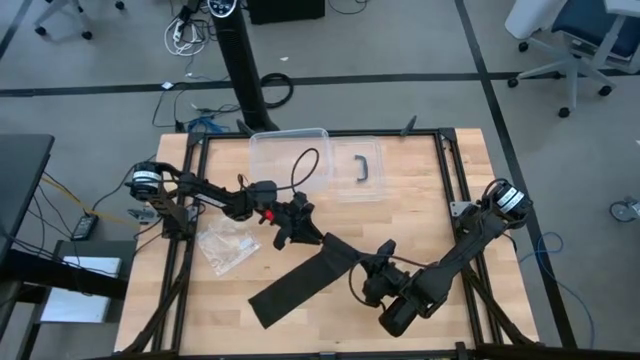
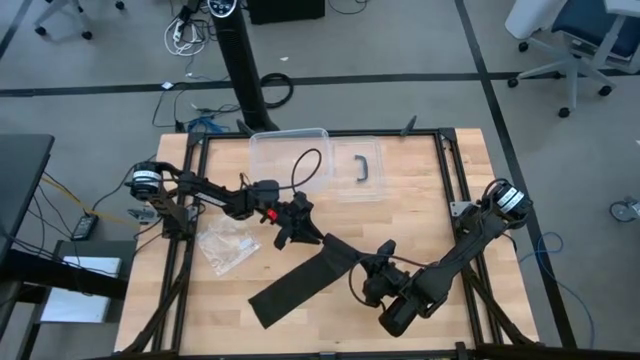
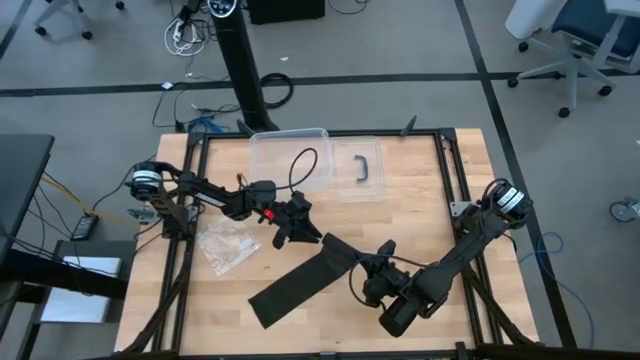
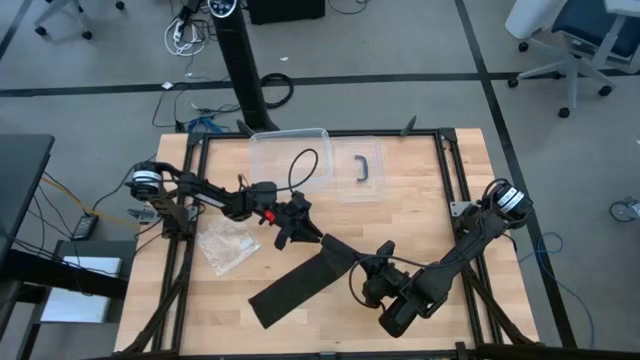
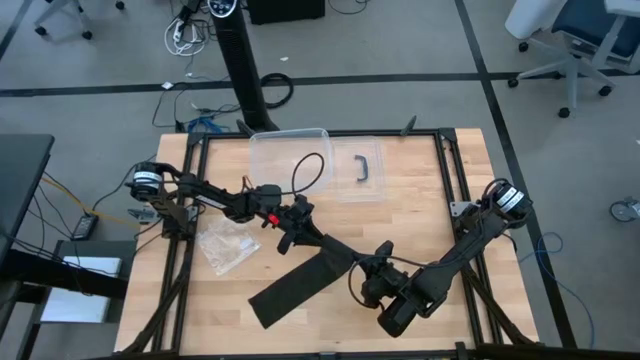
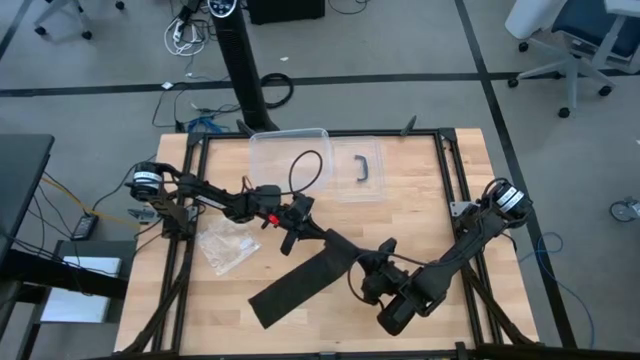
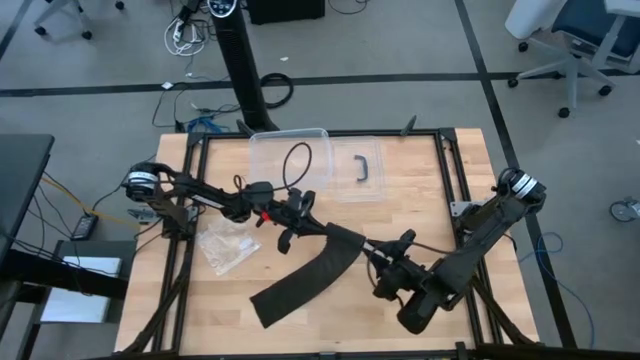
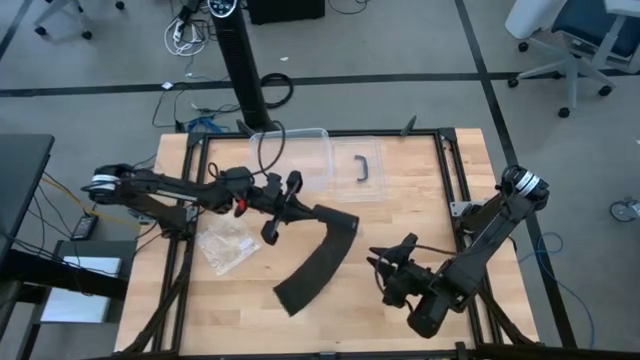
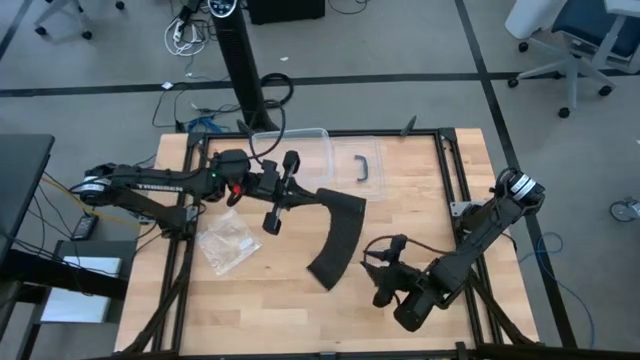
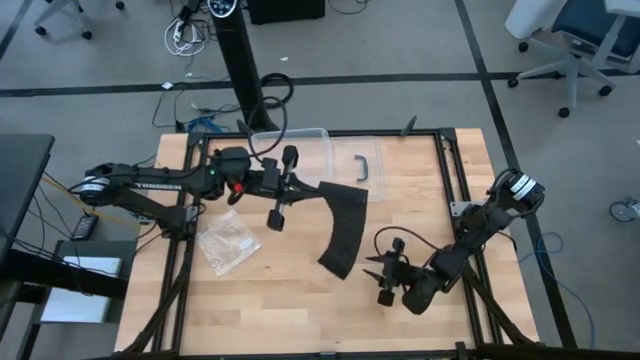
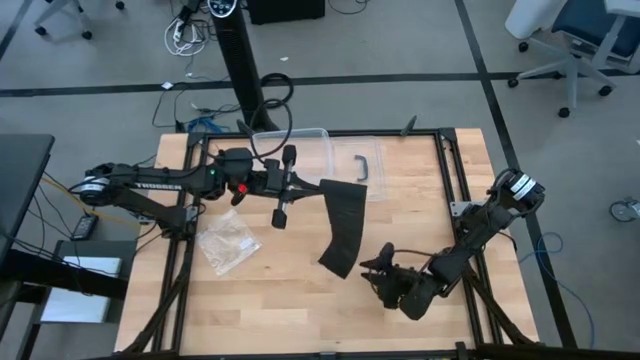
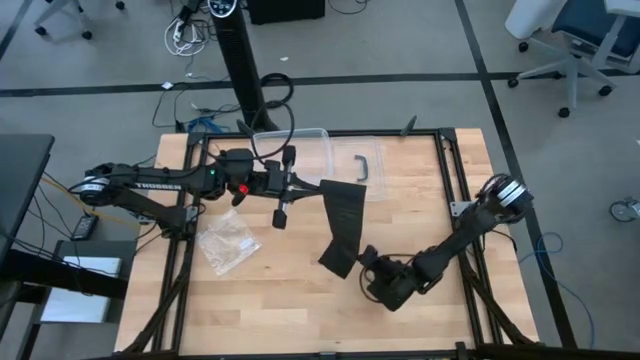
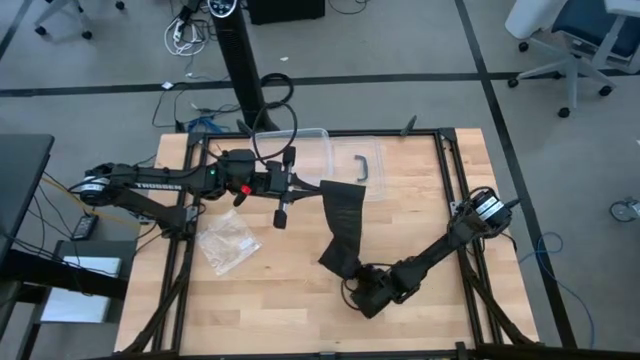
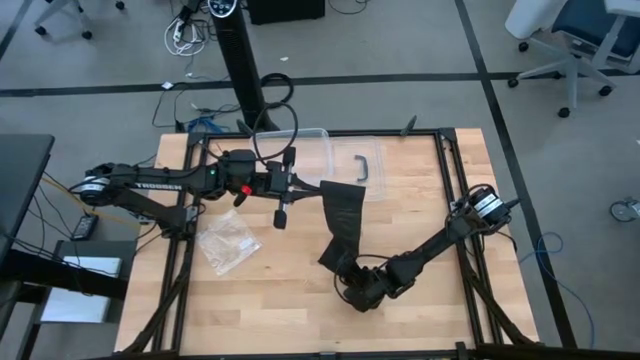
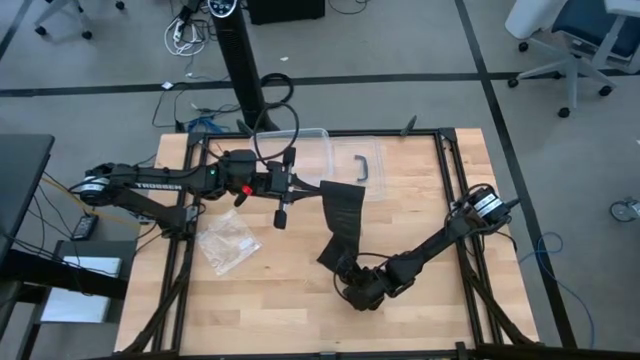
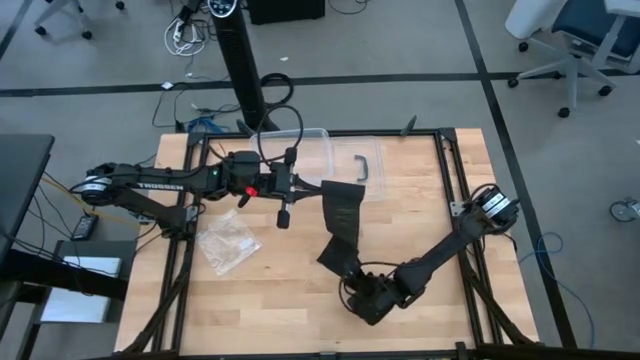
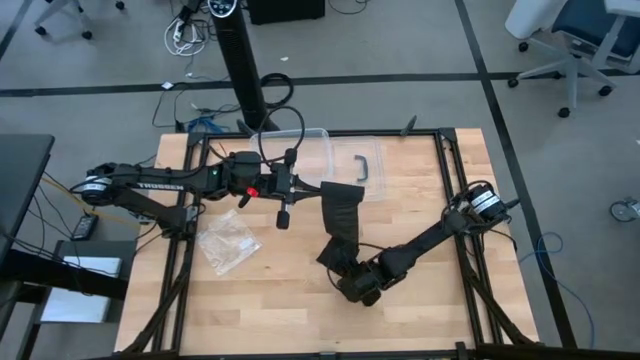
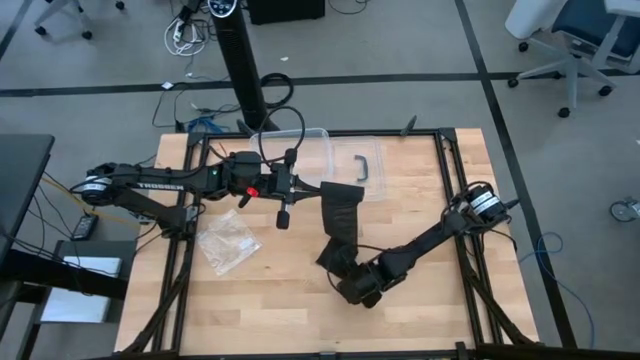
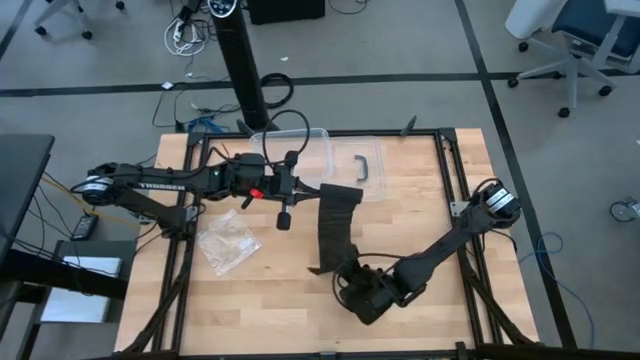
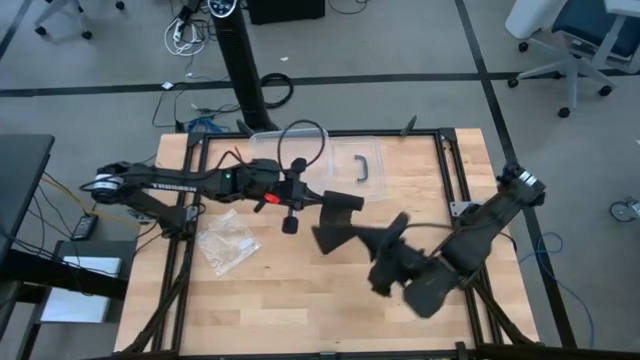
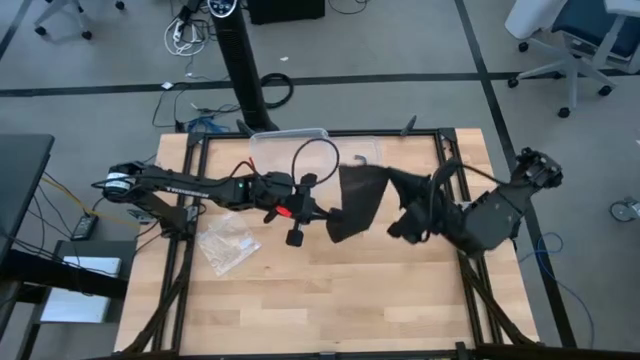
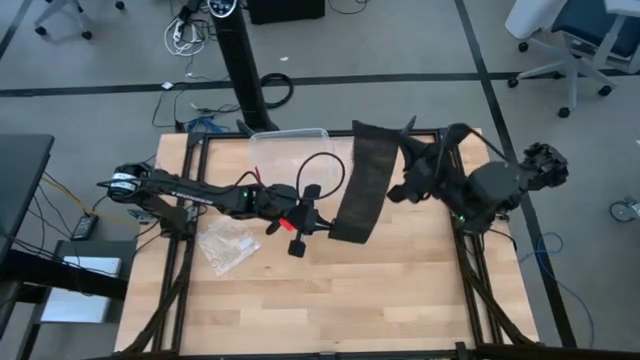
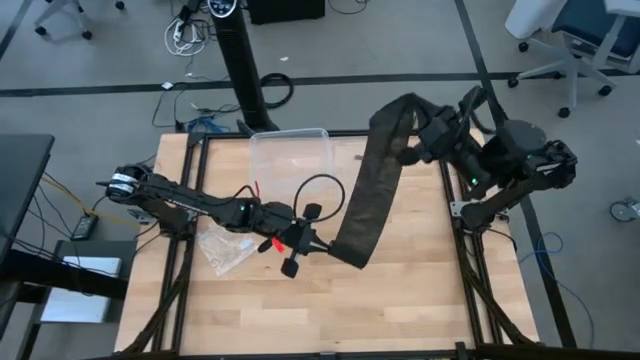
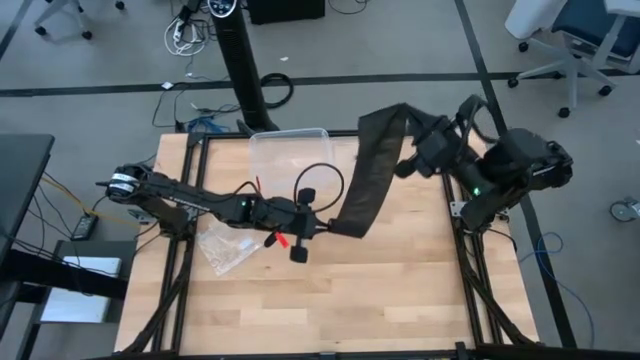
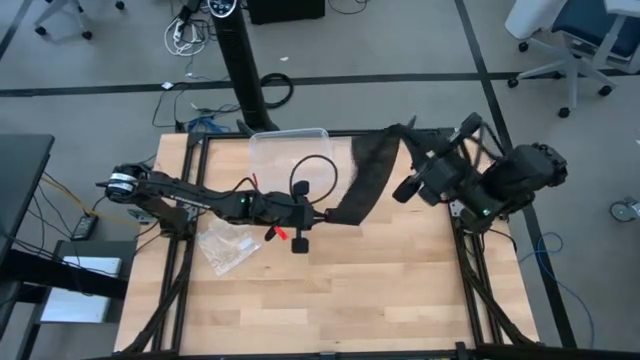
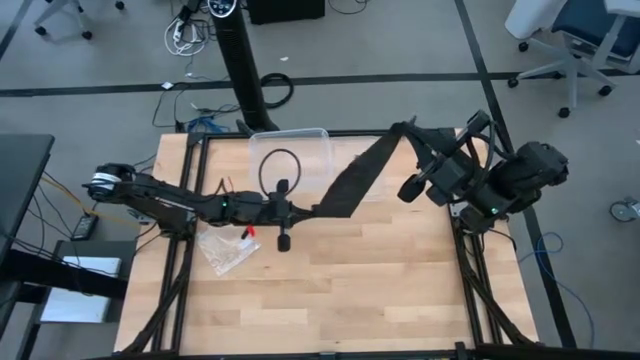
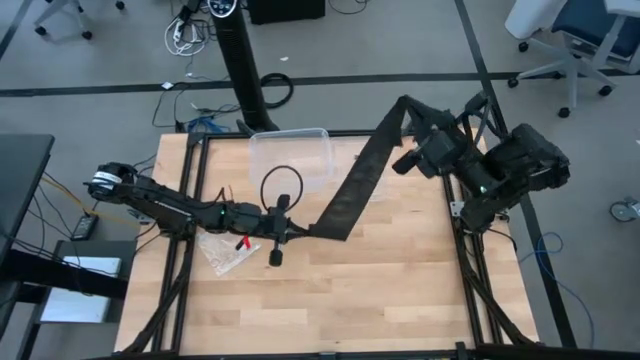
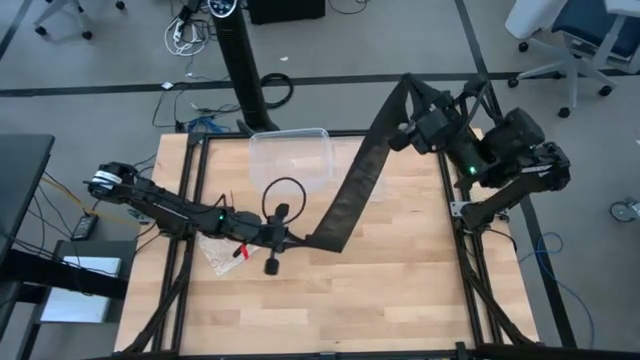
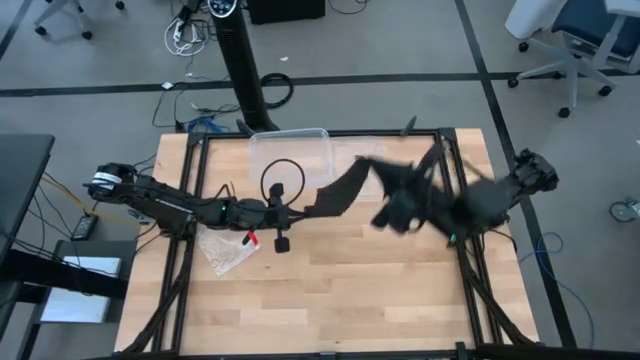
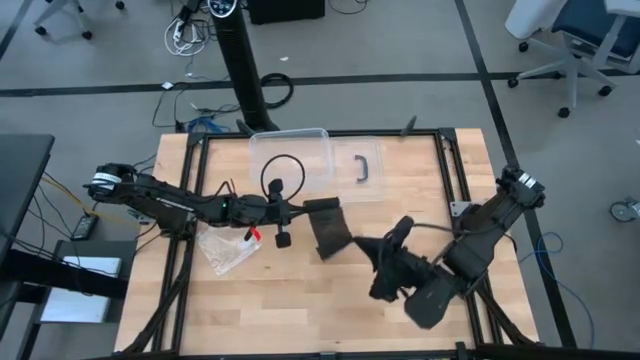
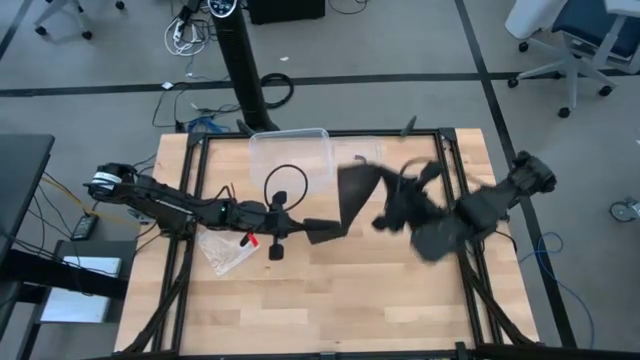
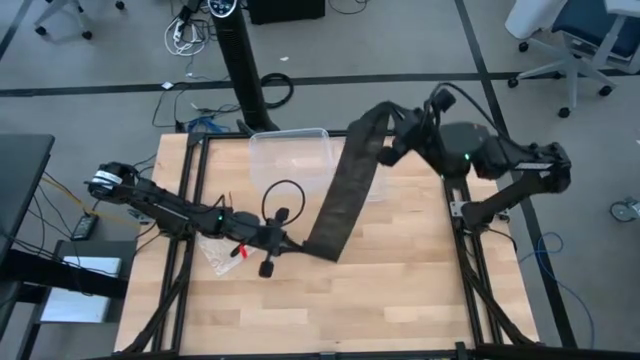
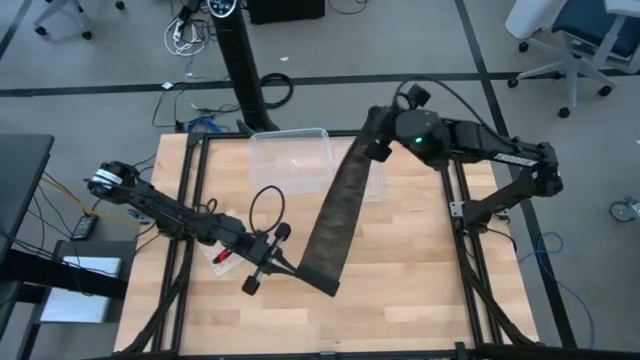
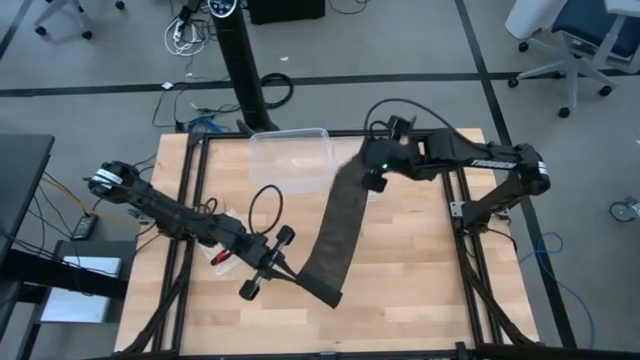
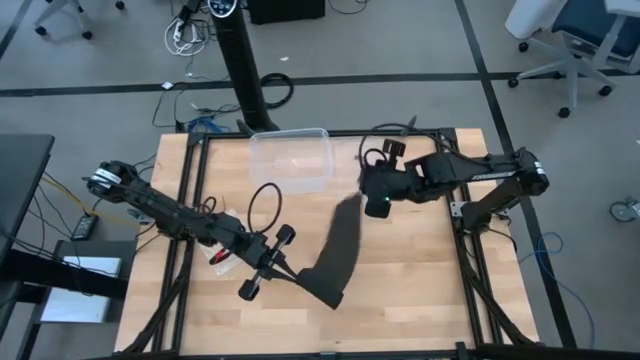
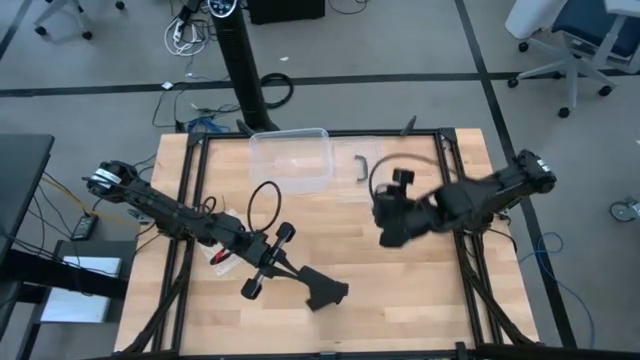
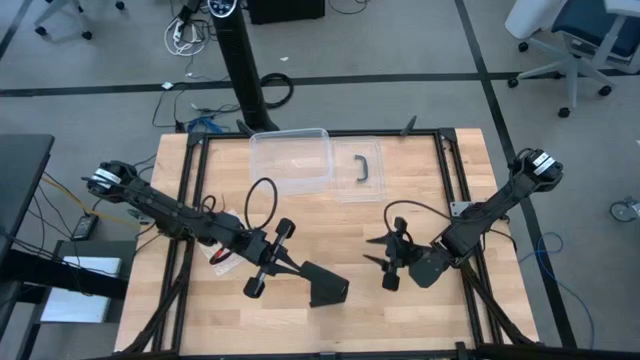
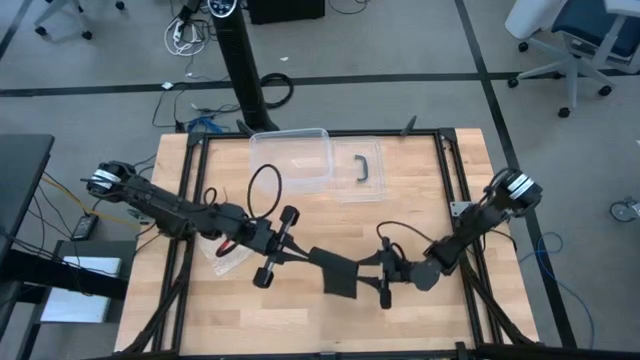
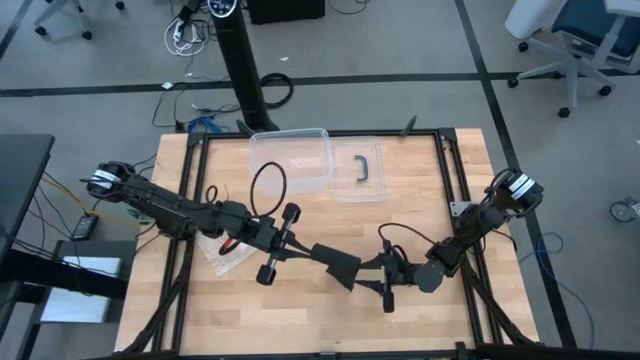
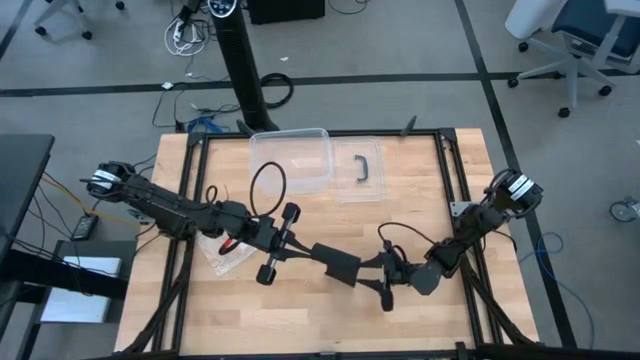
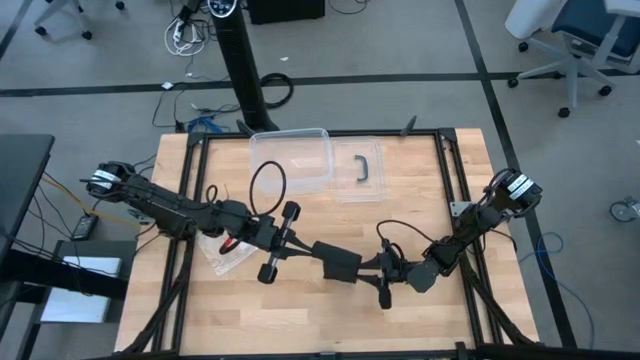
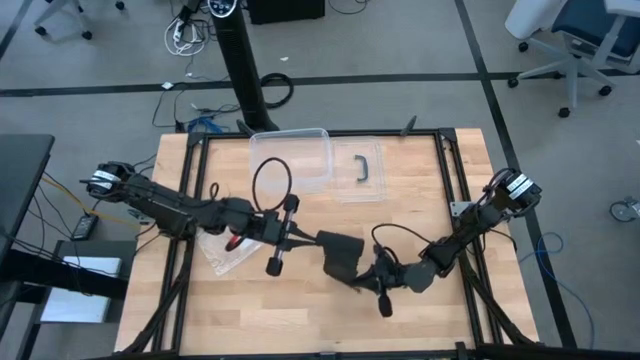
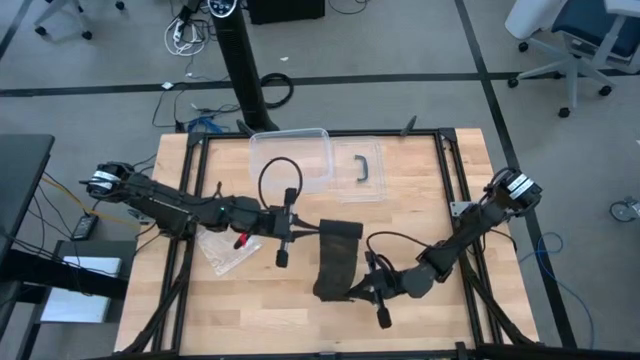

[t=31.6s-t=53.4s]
Task: Roll bandage
Roll the black bandage
